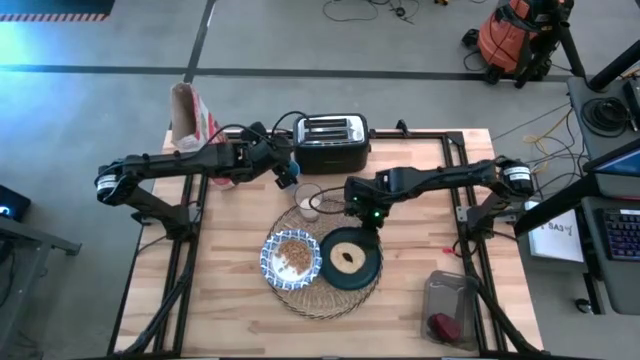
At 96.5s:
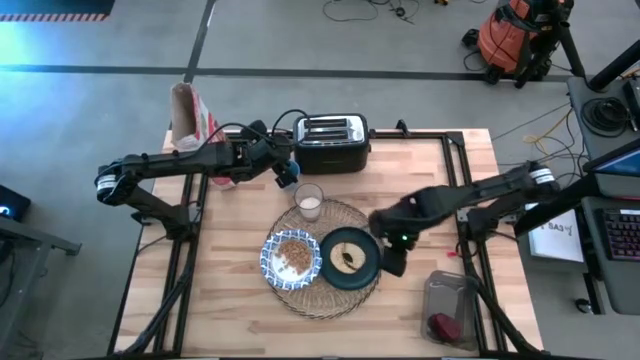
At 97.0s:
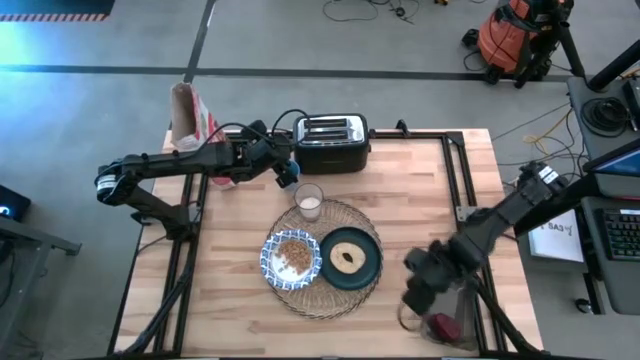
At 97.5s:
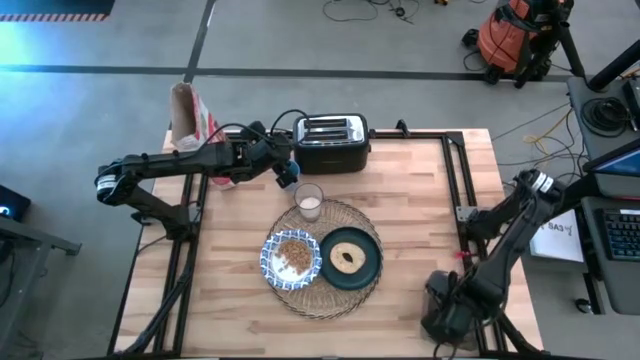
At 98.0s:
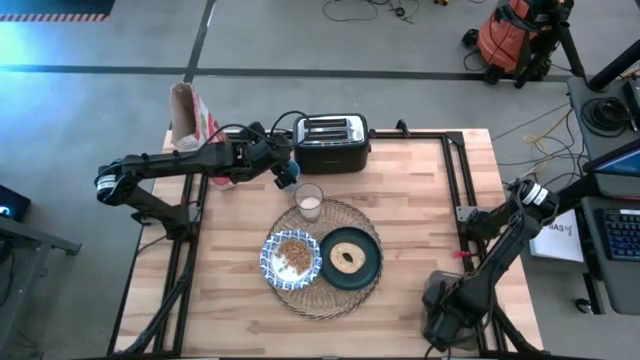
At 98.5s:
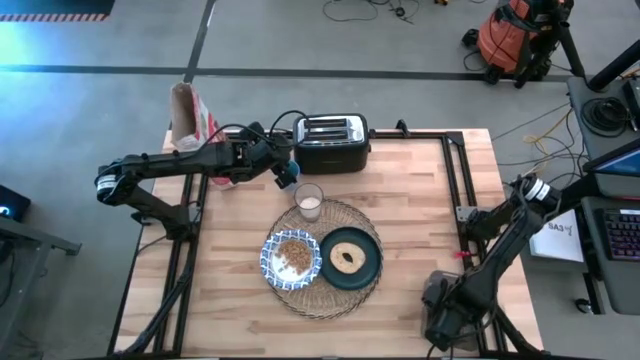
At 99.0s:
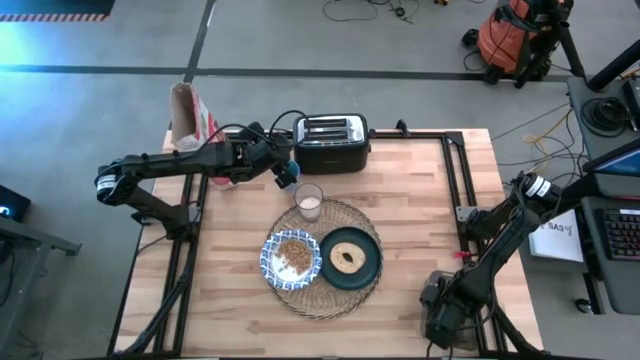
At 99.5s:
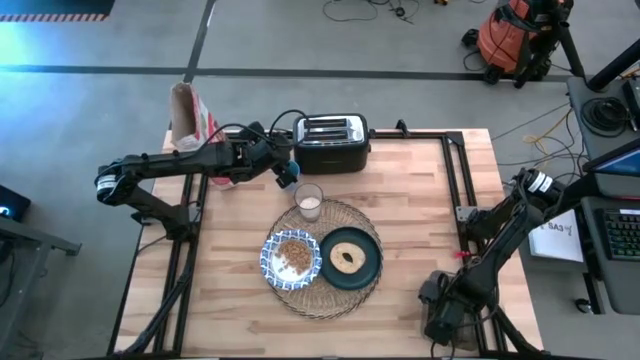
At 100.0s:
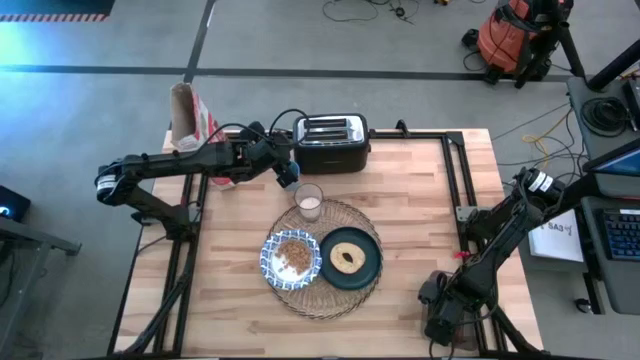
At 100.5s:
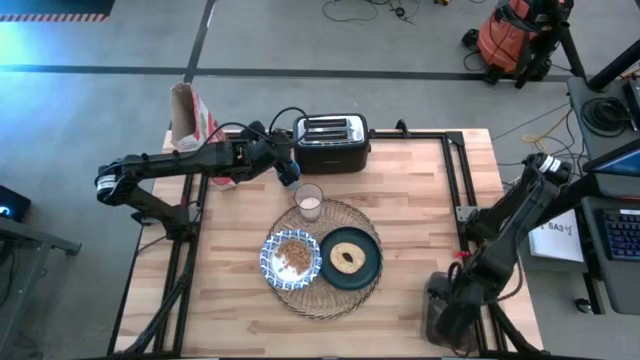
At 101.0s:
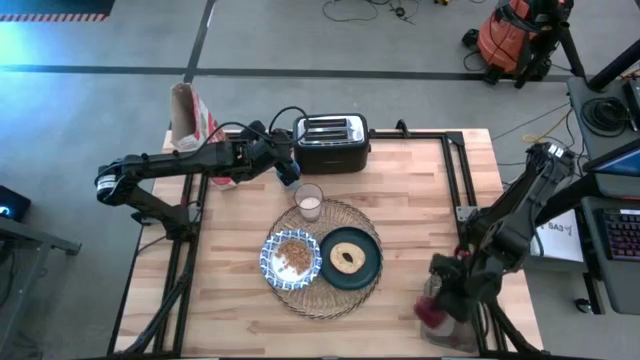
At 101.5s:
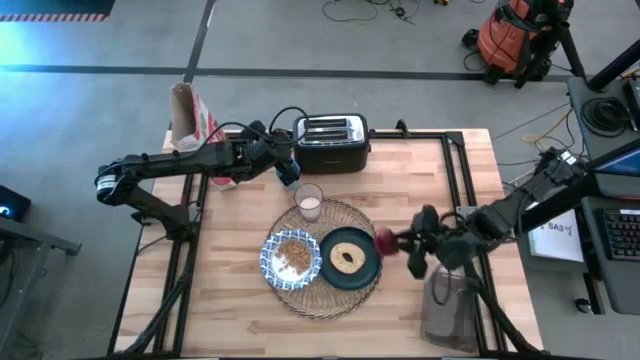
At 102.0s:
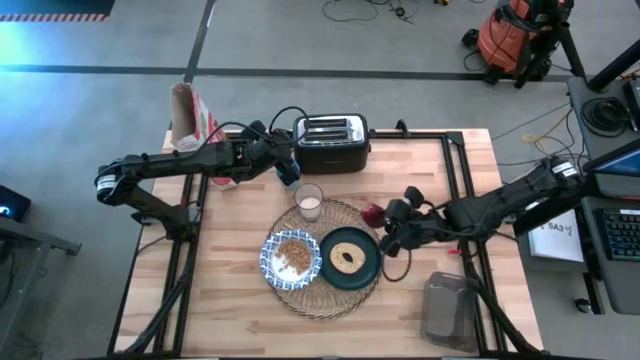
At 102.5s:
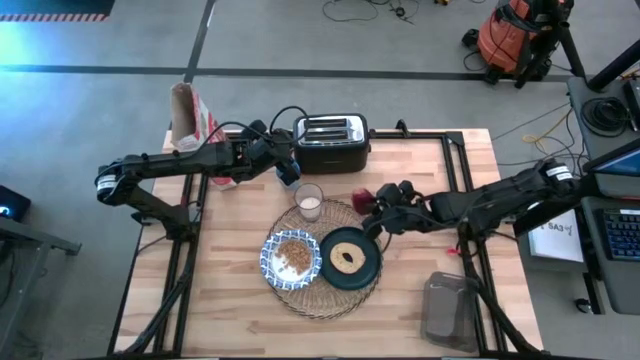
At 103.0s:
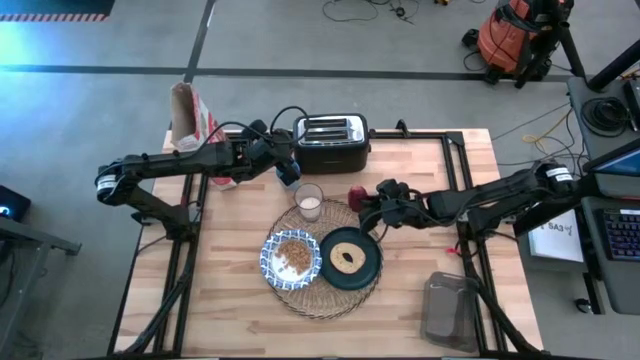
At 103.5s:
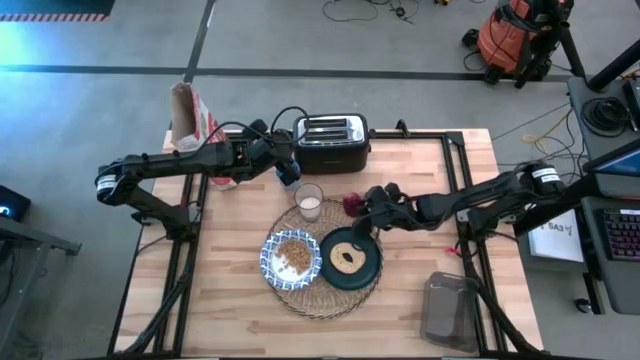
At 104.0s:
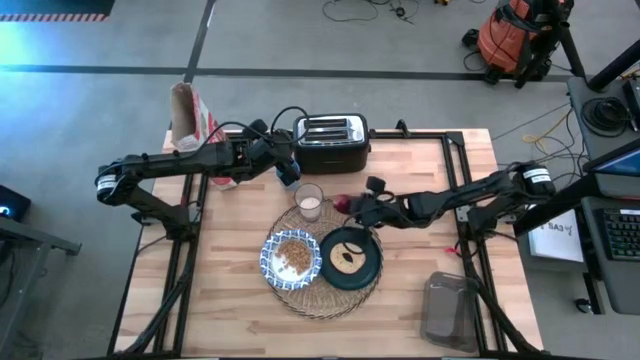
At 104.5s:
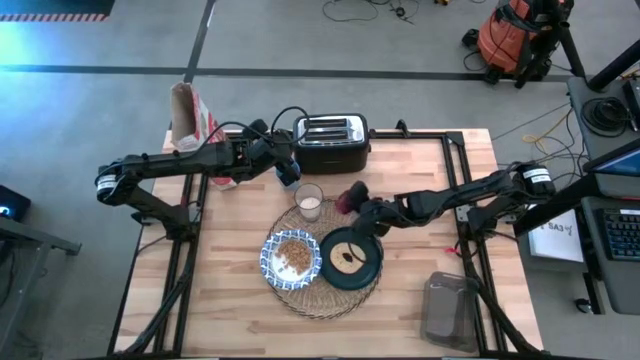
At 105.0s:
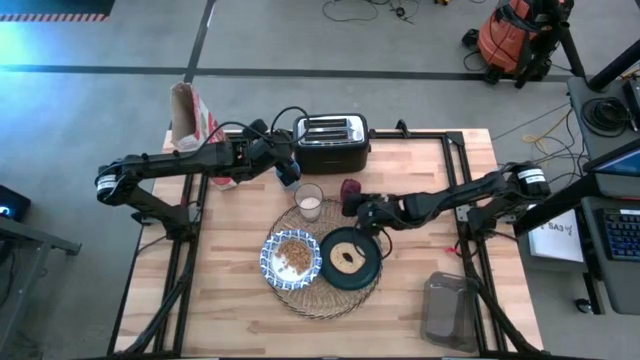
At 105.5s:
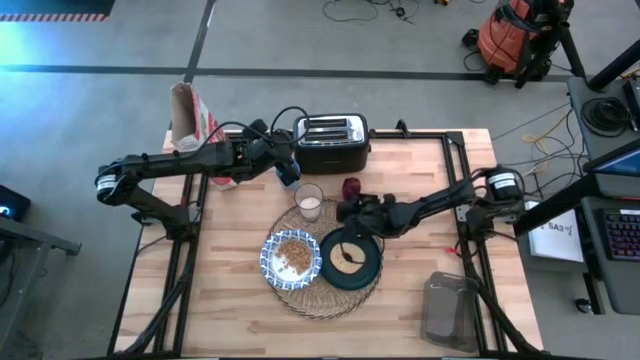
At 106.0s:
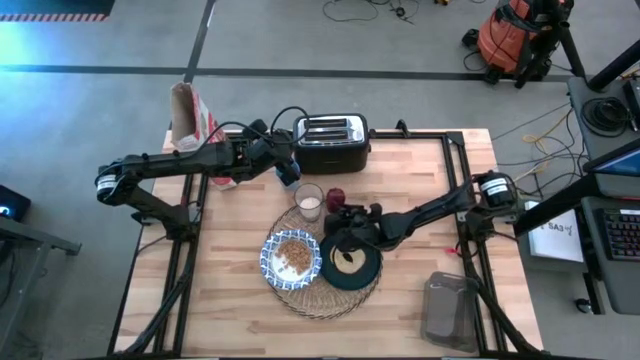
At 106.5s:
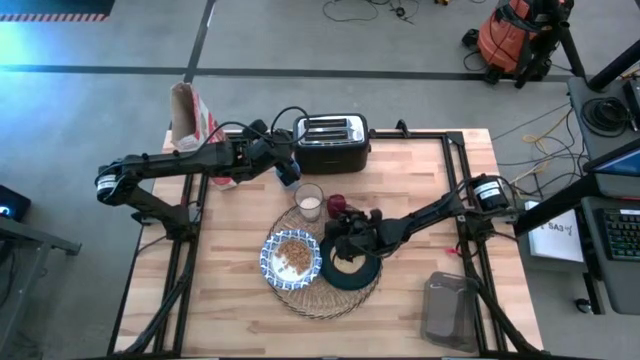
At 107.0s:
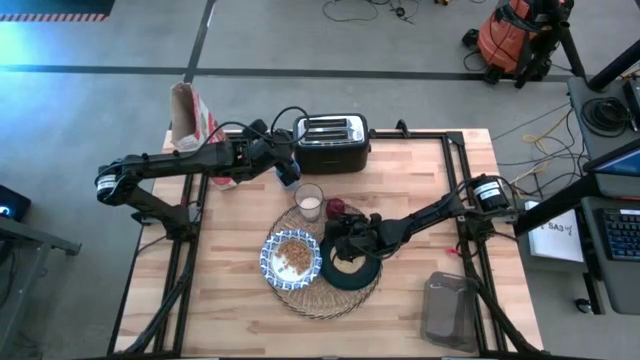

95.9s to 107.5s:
Task: Arrange a breakfast setting
Put the red apple on the brown mat

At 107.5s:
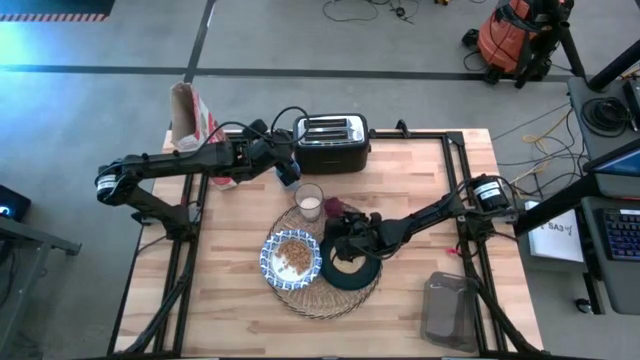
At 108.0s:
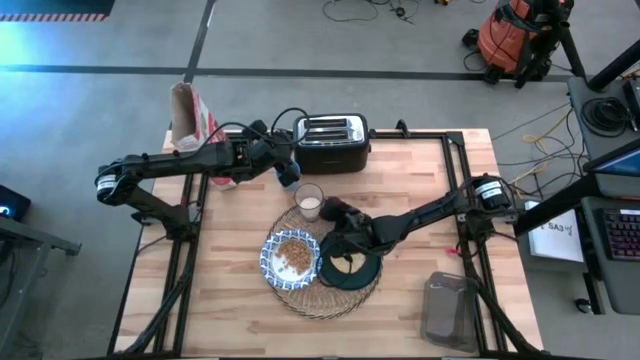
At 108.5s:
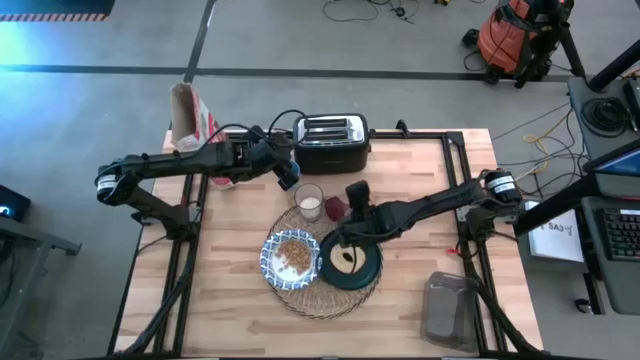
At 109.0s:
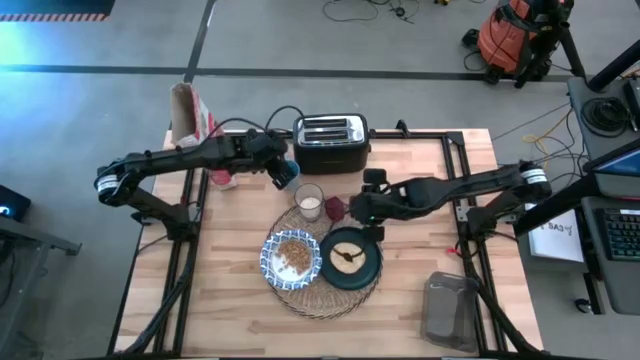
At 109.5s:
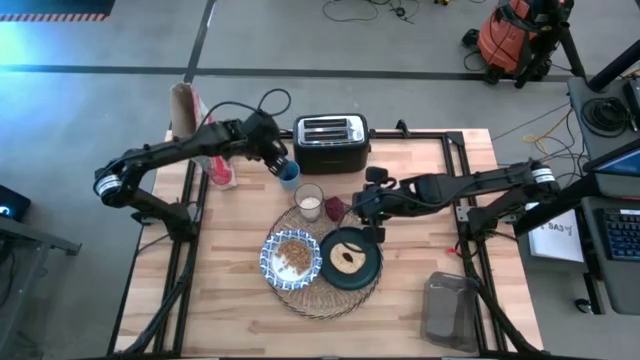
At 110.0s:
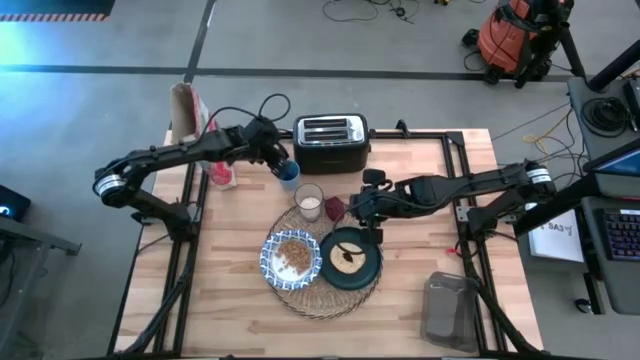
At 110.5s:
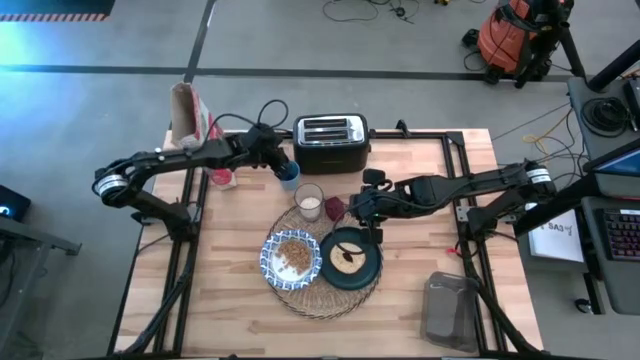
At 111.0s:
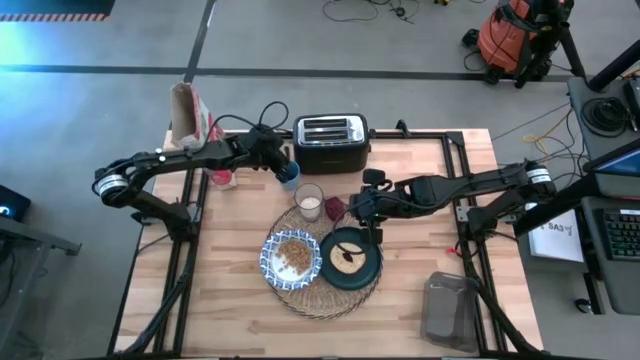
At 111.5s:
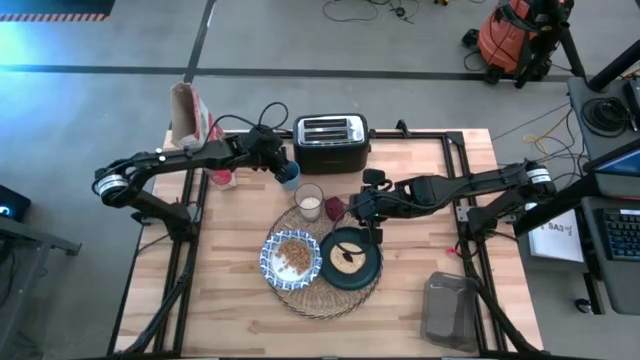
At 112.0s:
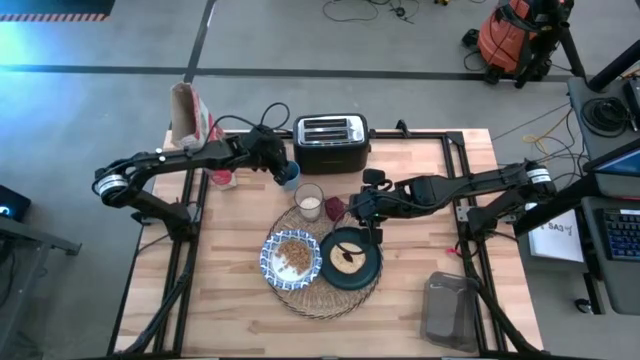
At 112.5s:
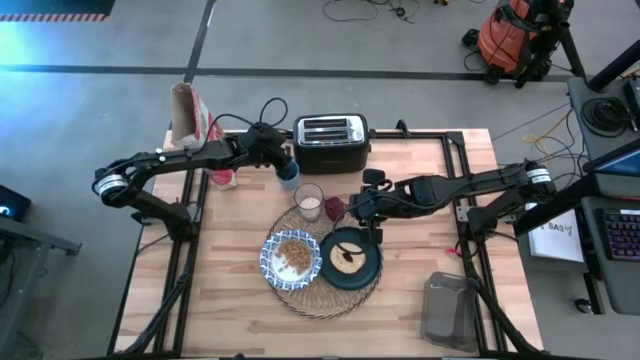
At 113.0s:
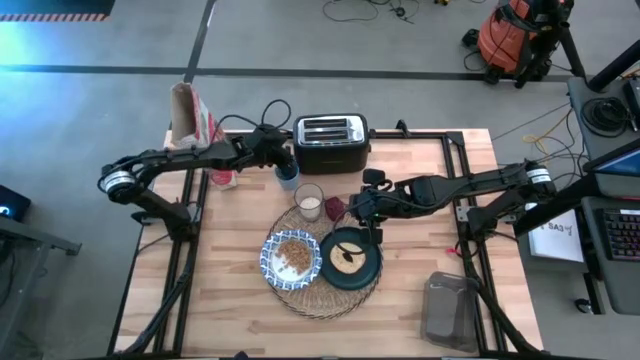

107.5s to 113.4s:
Move the iridescent spoon to the middle left of the table

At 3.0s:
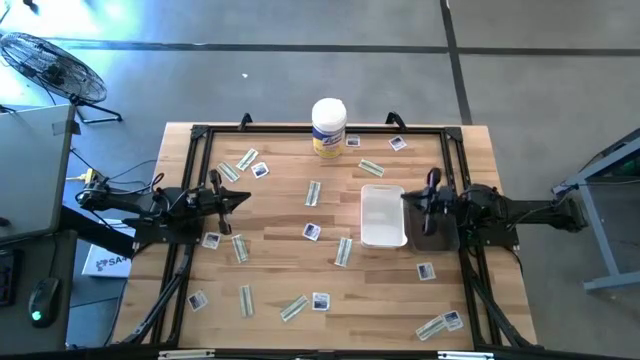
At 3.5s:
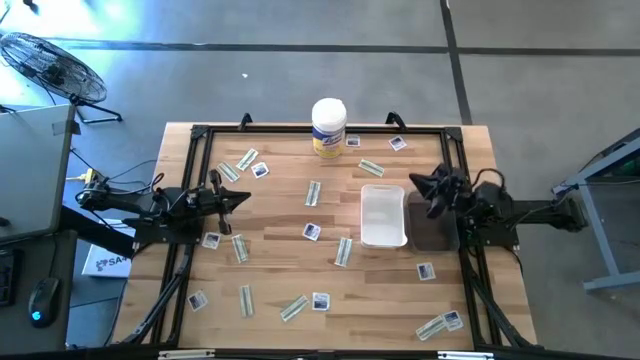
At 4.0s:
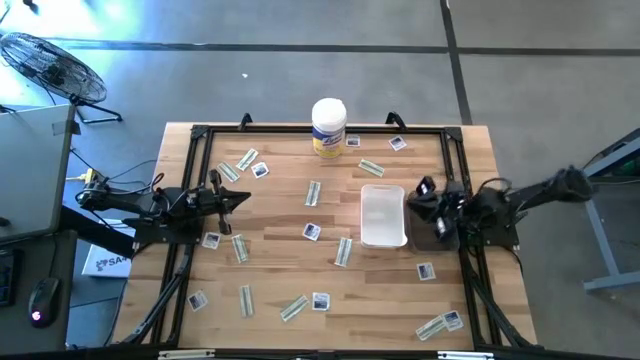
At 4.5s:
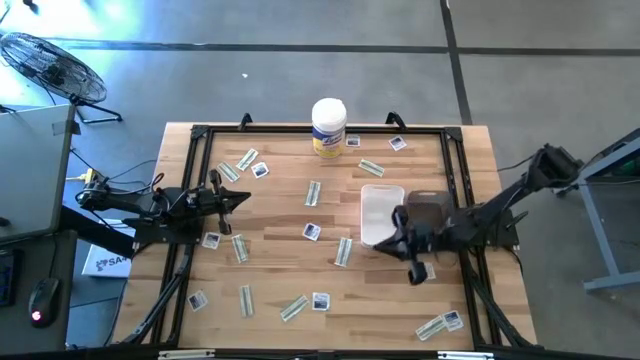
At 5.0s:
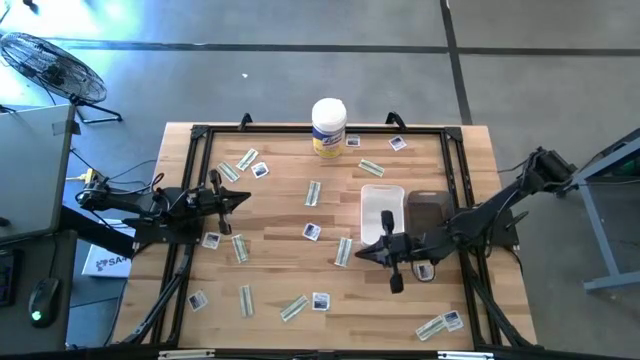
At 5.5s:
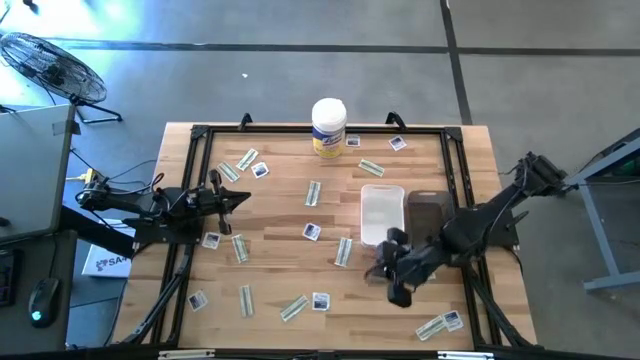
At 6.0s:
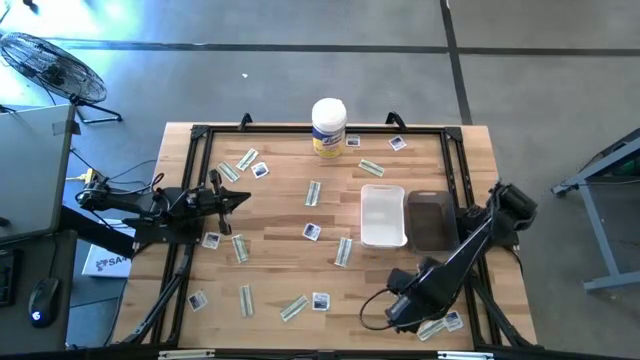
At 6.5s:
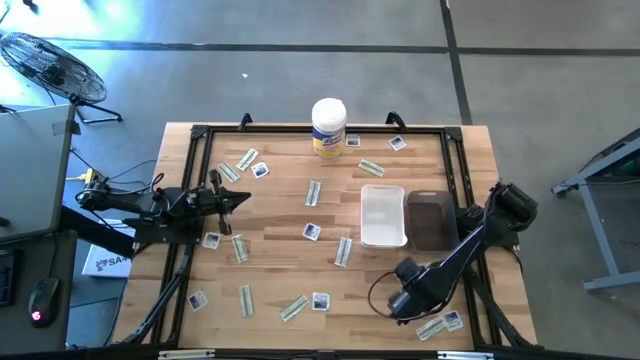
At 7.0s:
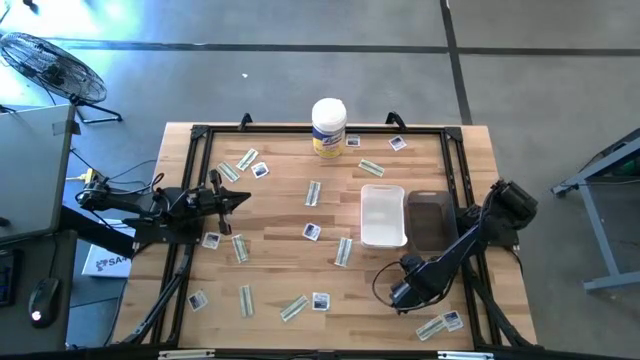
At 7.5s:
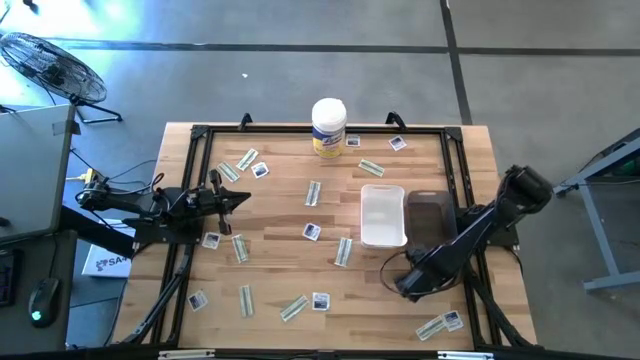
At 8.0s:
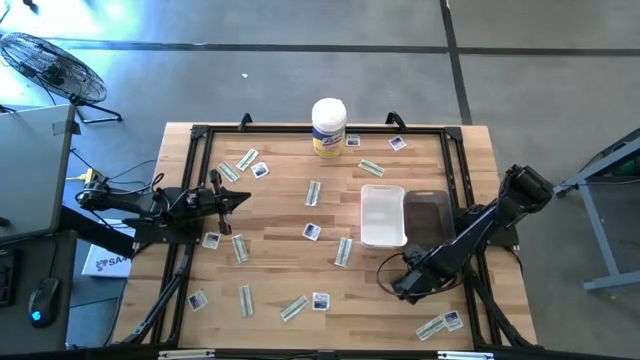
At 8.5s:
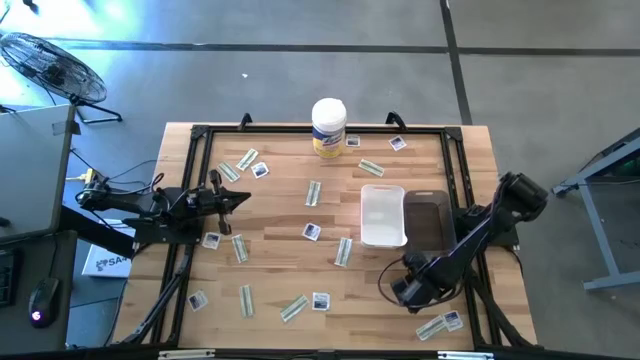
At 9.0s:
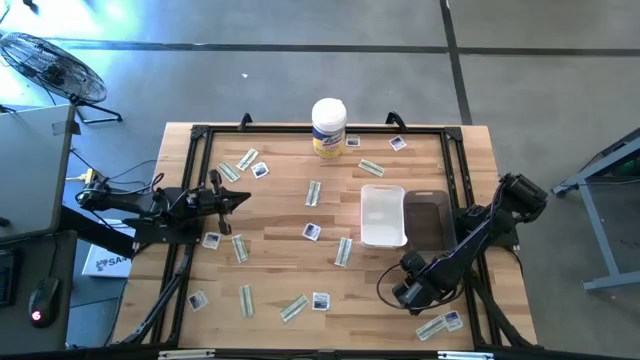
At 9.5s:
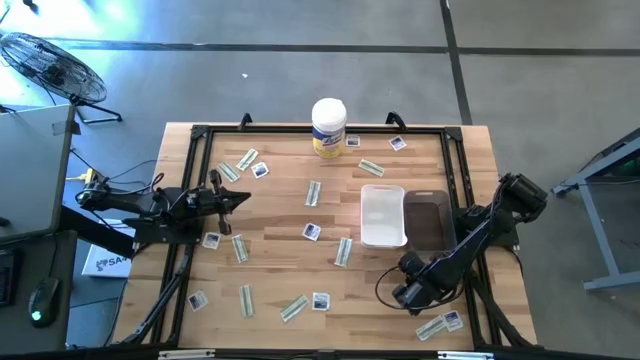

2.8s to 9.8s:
Task: Pick & Place First Aid Supplies
Put the blue alcohol pad into the black bin
